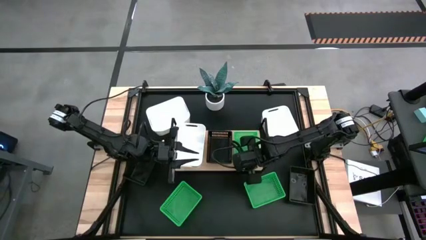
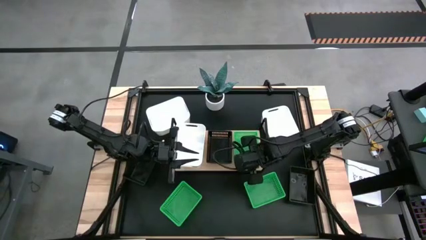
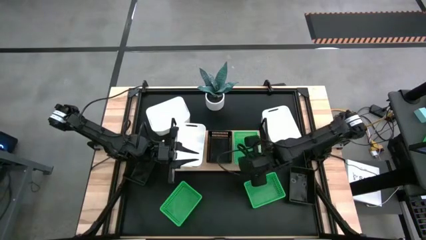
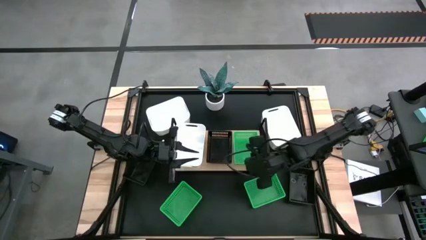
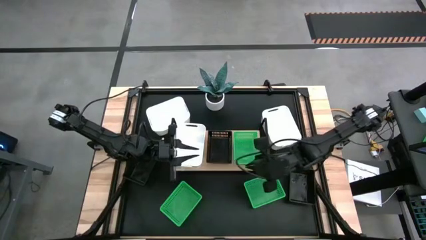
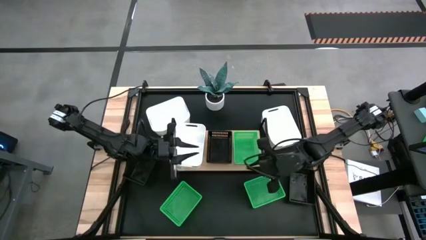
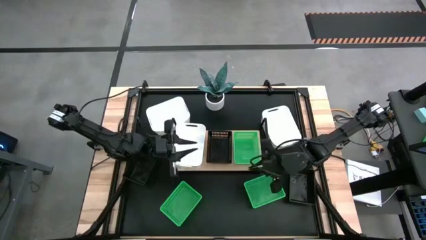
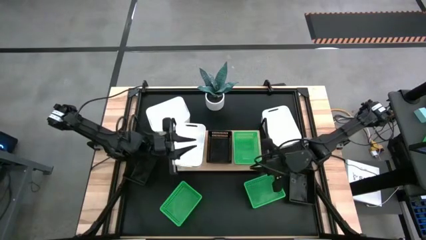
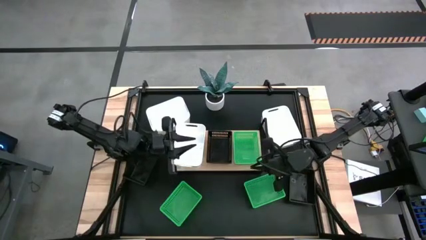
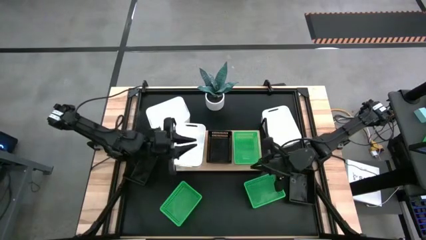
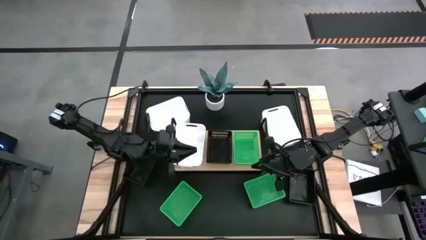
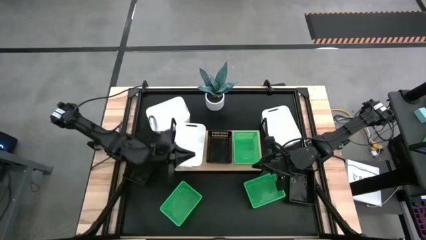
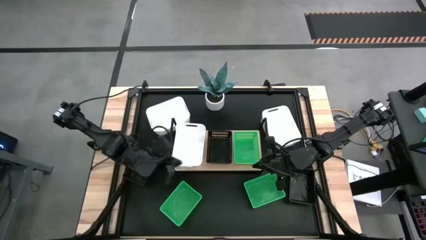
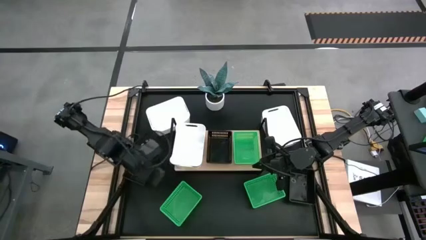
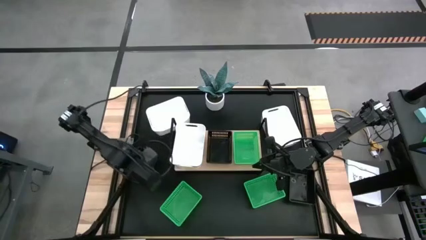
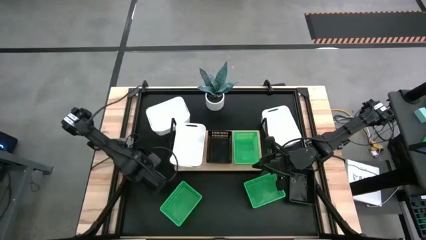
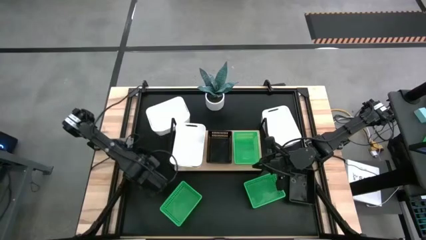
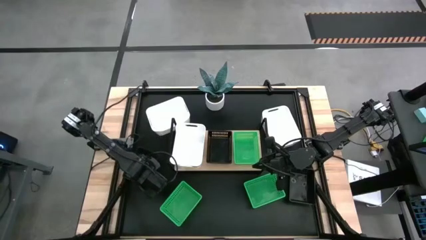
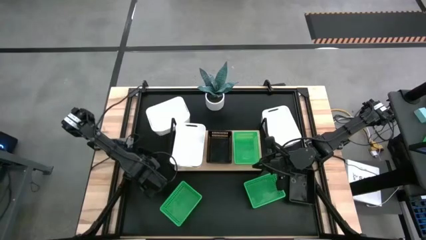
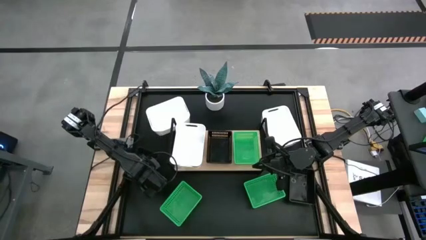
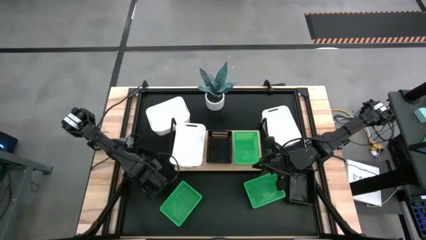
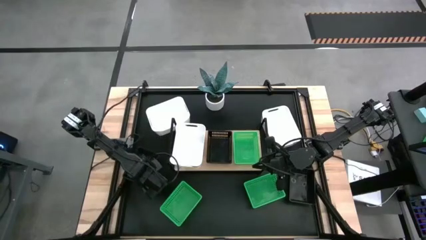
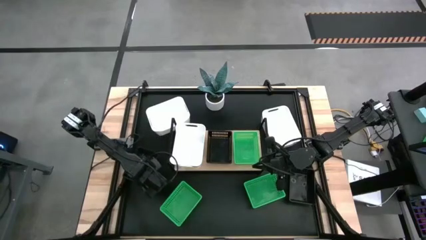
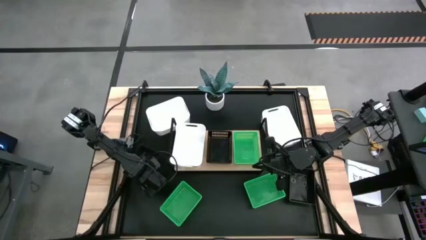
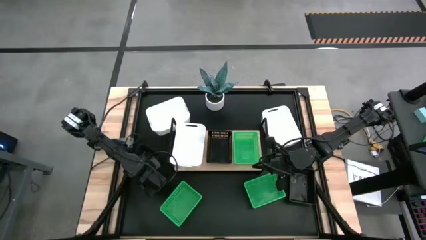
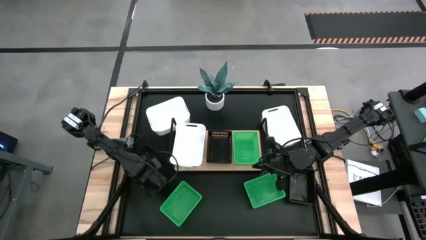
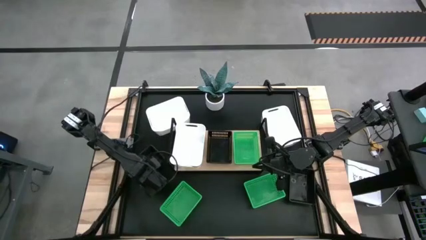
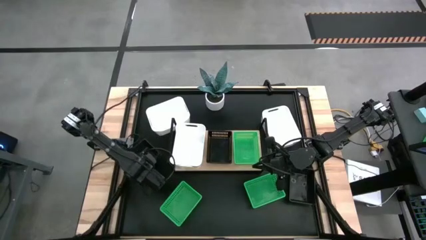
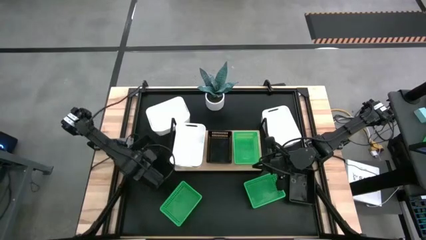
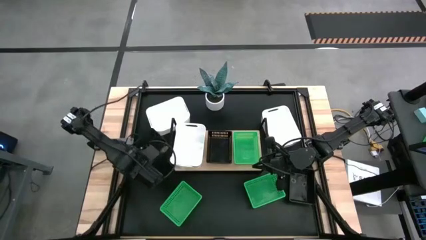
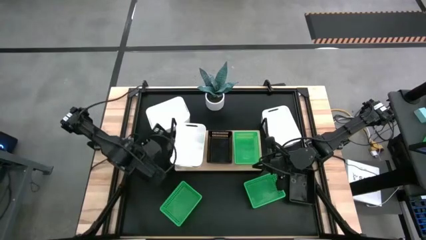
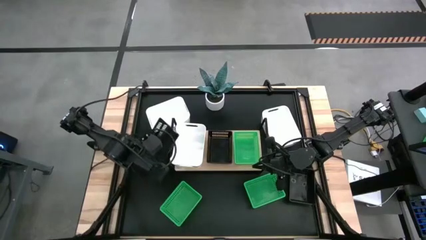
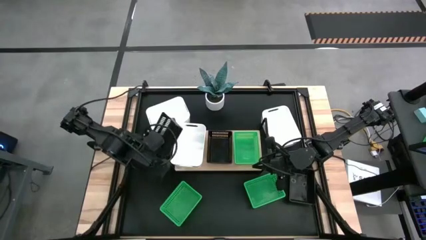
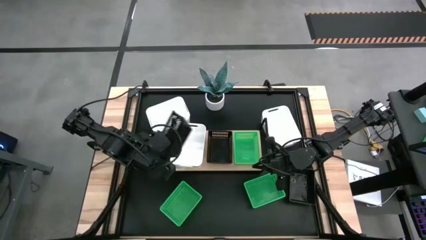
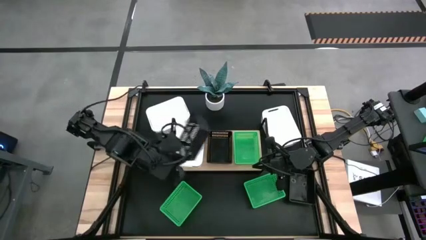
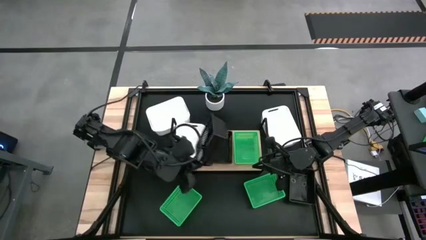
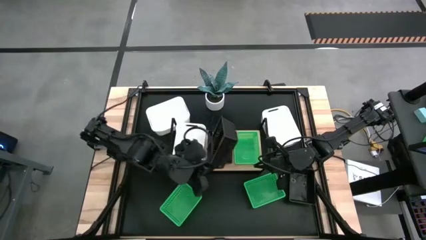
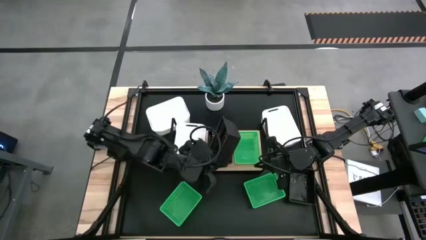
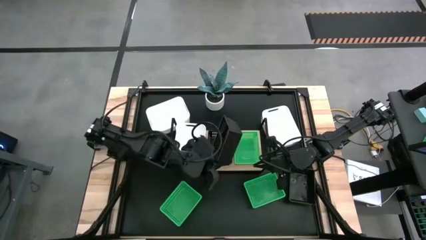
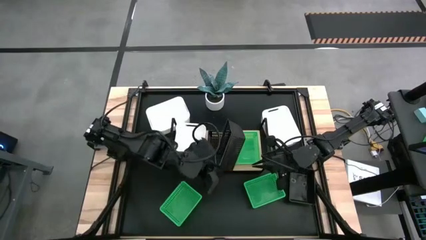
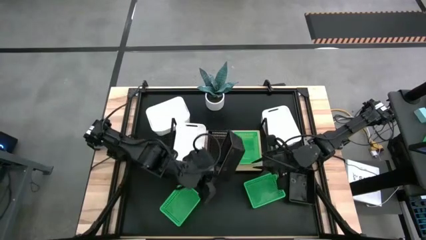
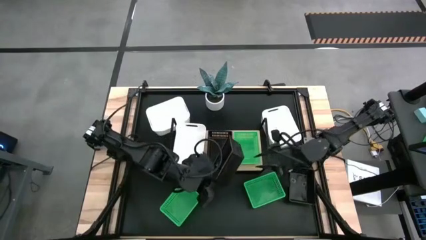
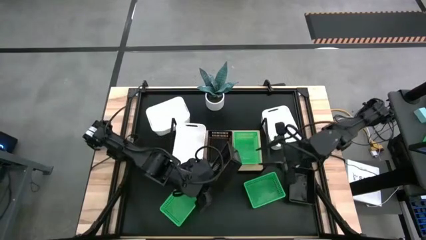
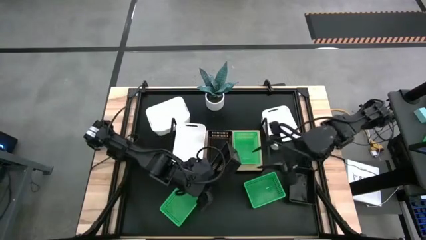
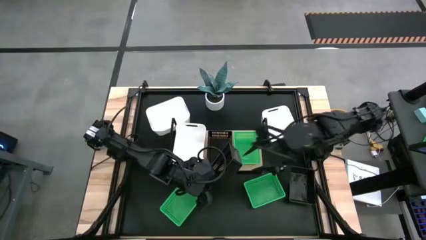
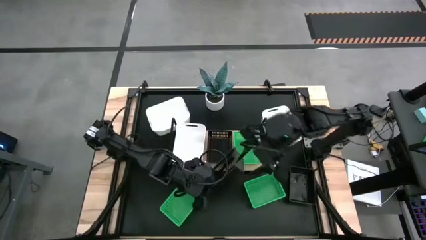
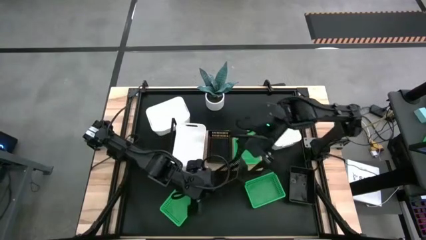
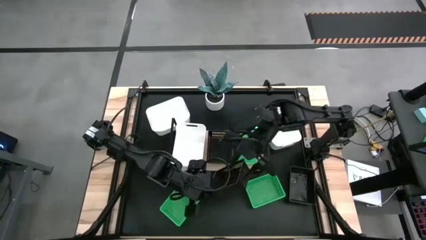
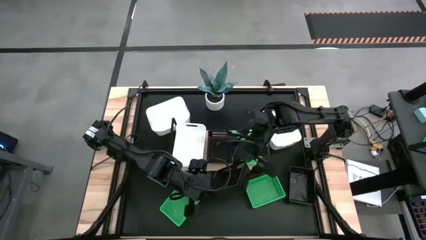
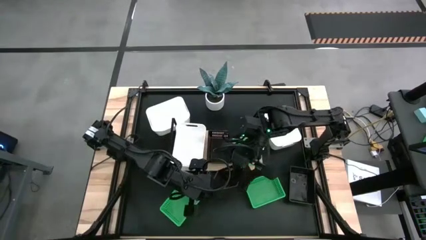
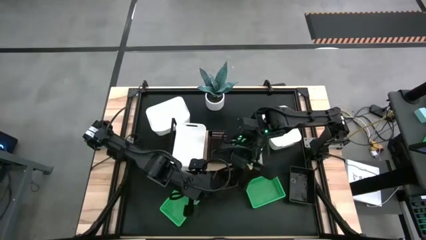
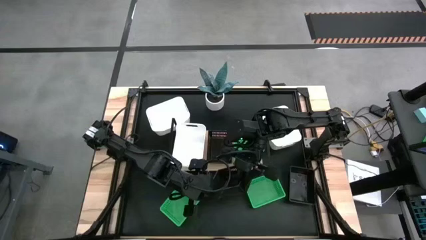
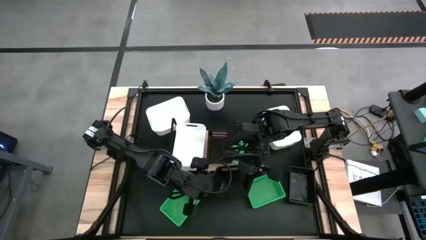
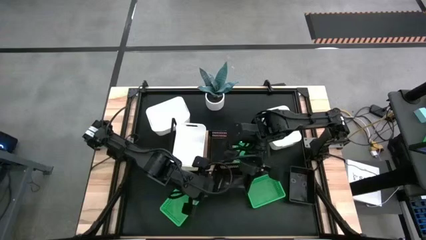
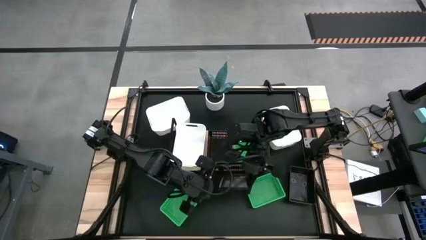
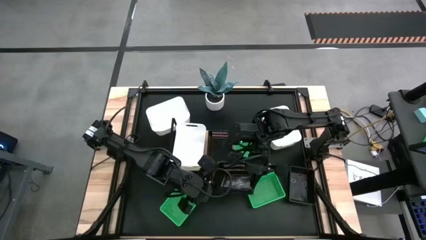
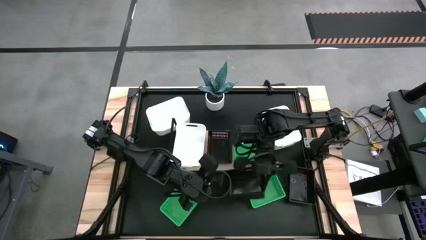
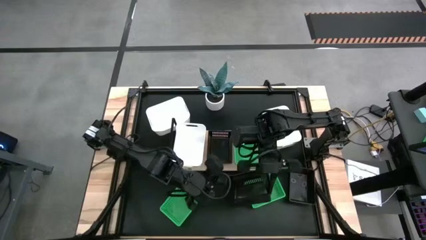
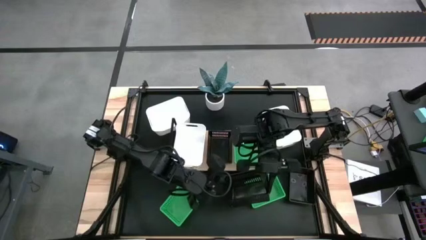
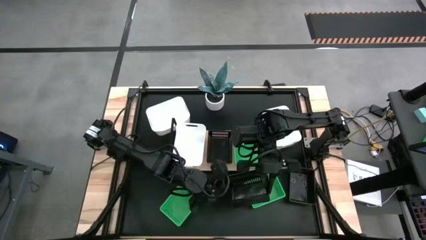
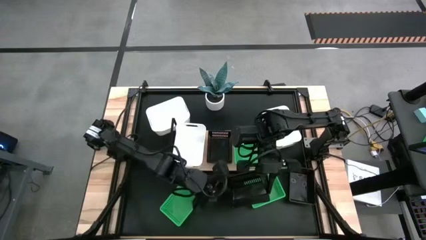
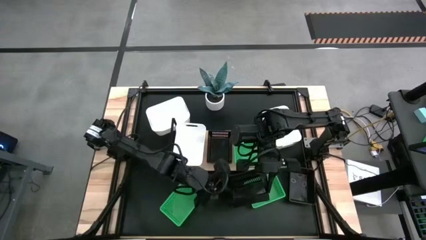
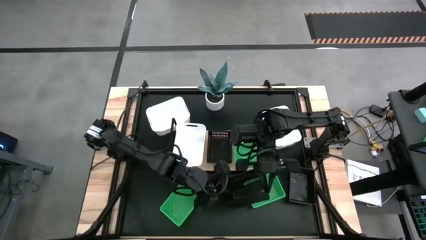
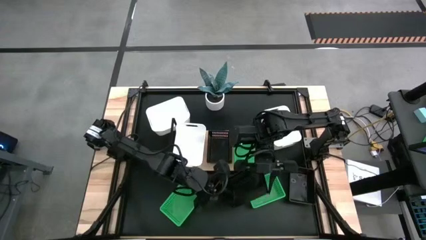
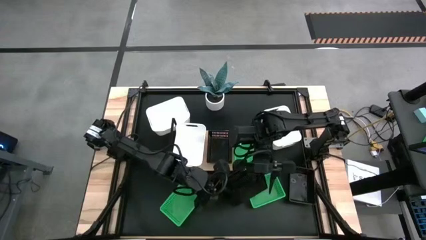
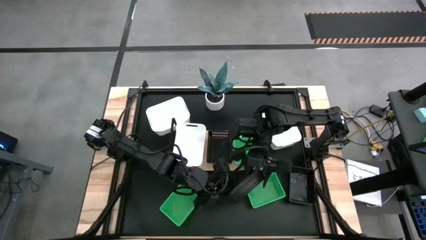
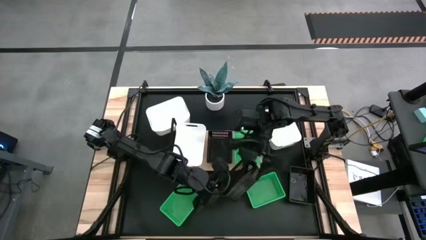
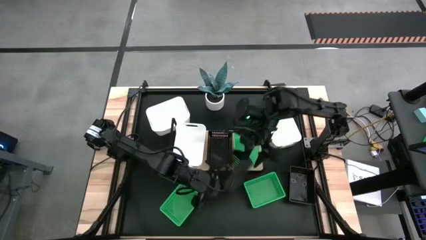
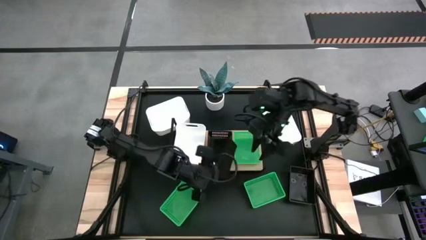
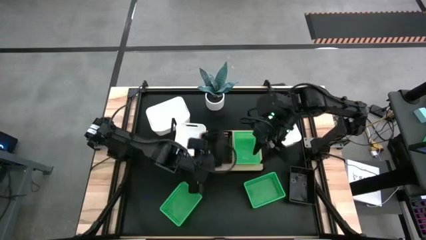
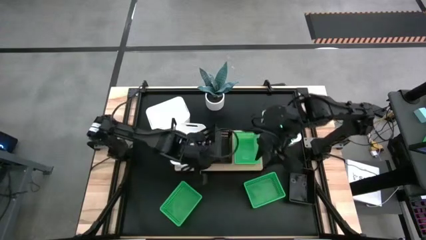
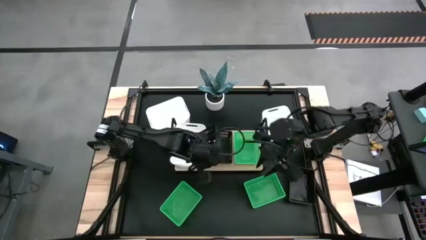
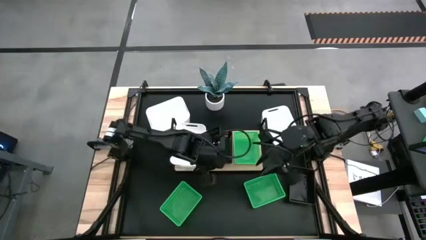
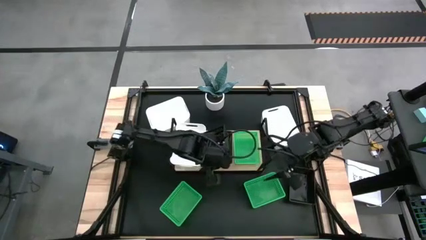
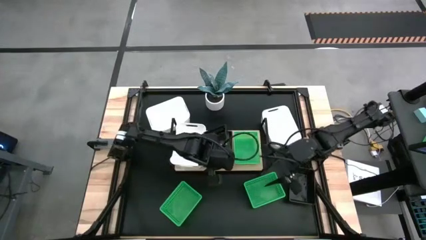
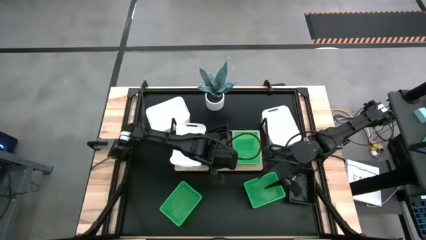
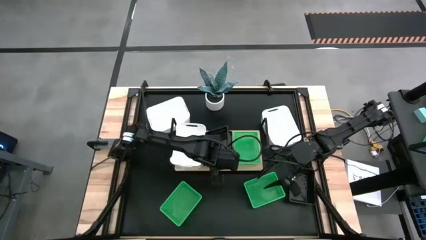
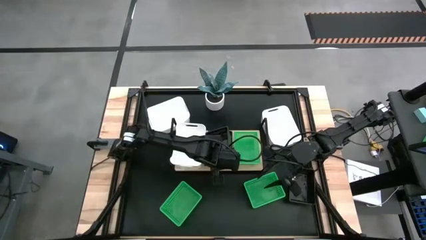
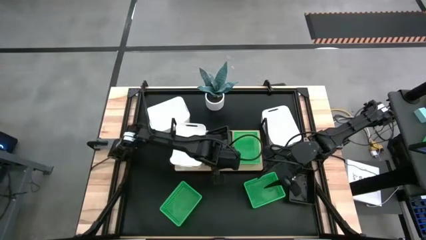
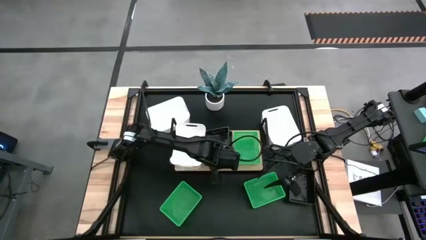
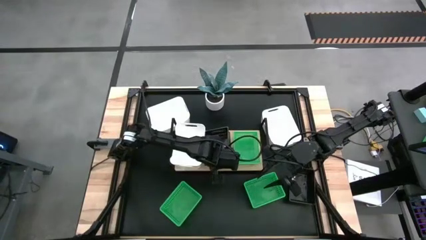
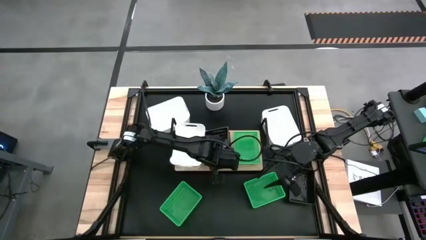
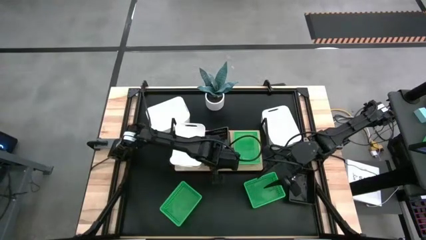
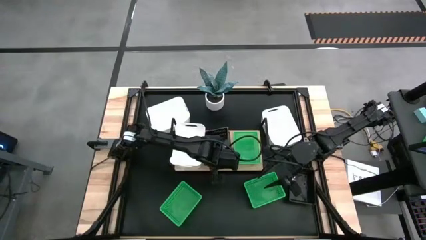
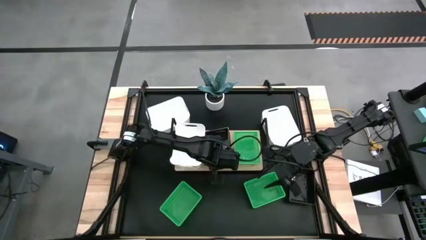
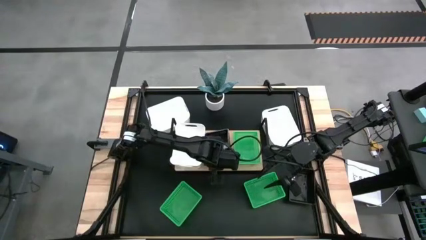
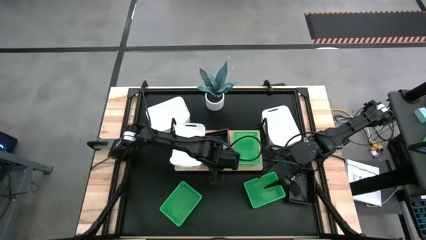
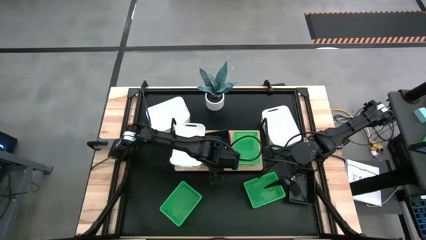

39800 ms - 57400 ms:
Task: Stack baskets on shelf by color
Stack the left black bin on top of the other black bin on the shelf
